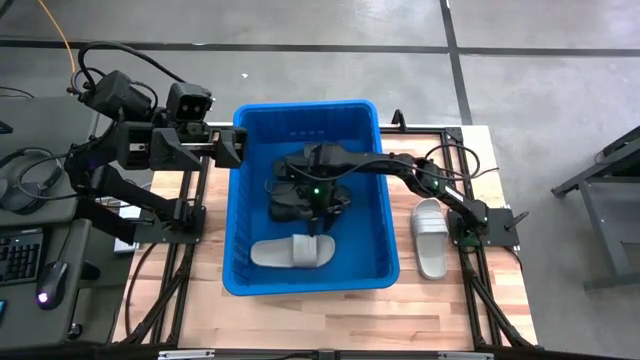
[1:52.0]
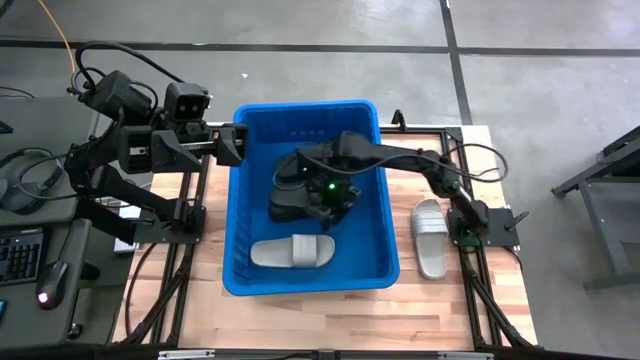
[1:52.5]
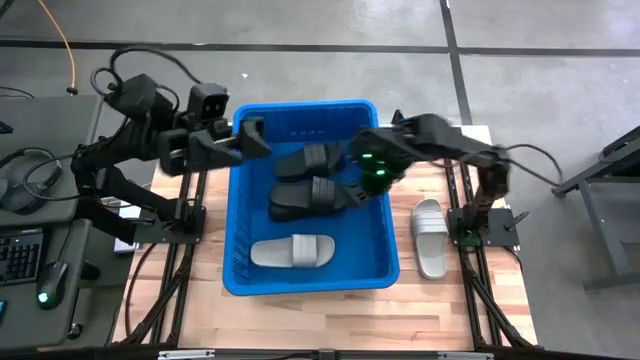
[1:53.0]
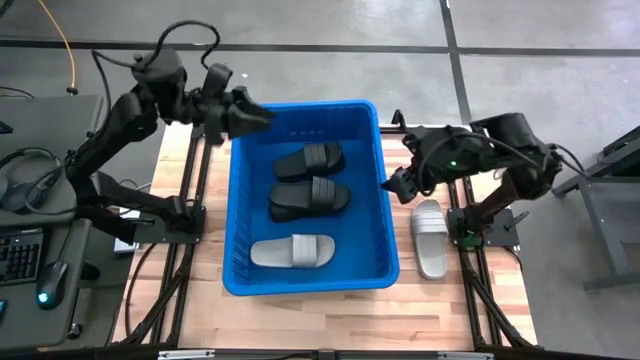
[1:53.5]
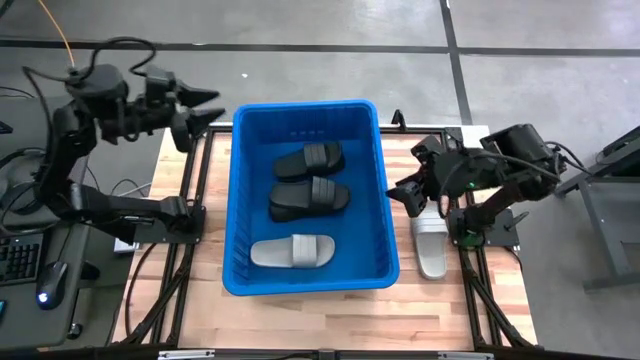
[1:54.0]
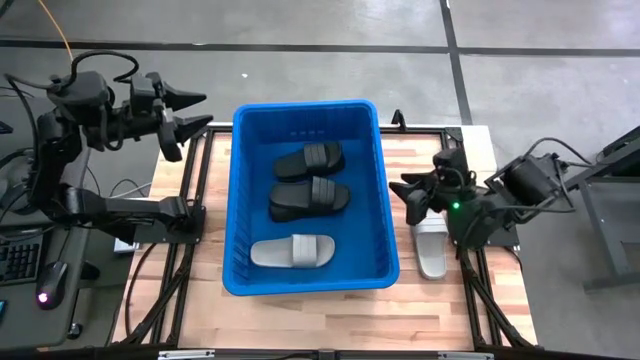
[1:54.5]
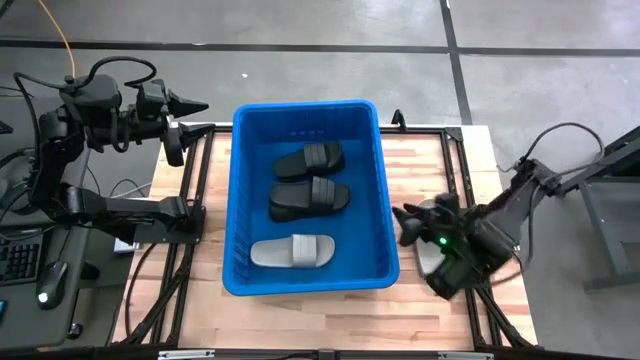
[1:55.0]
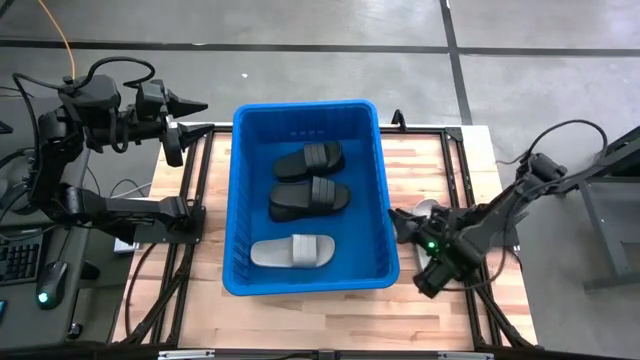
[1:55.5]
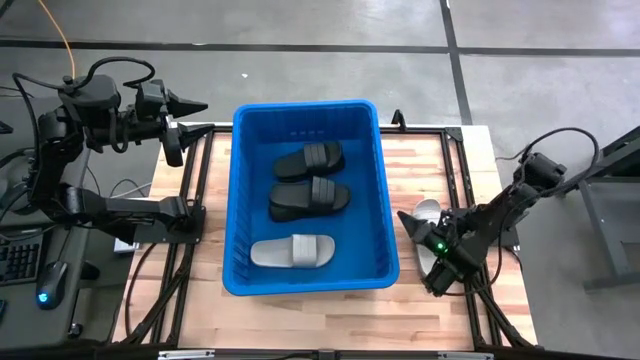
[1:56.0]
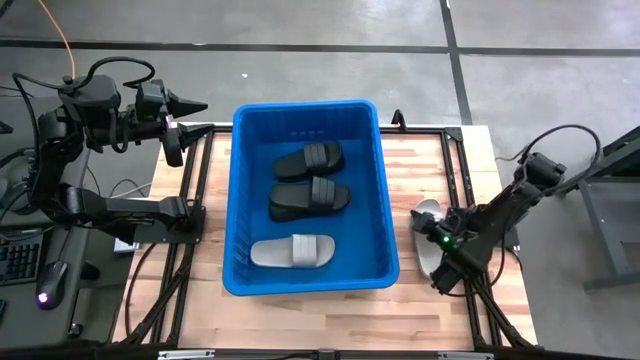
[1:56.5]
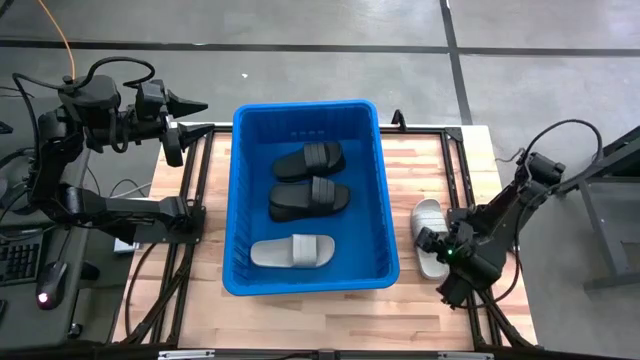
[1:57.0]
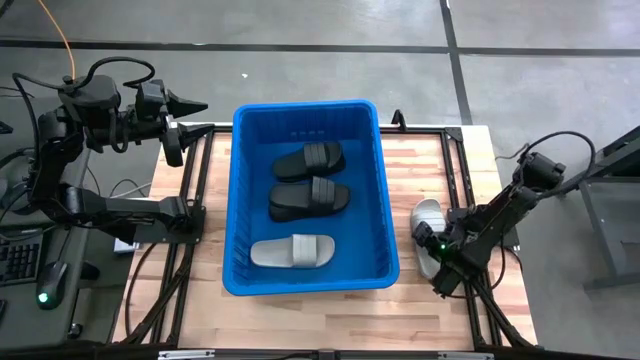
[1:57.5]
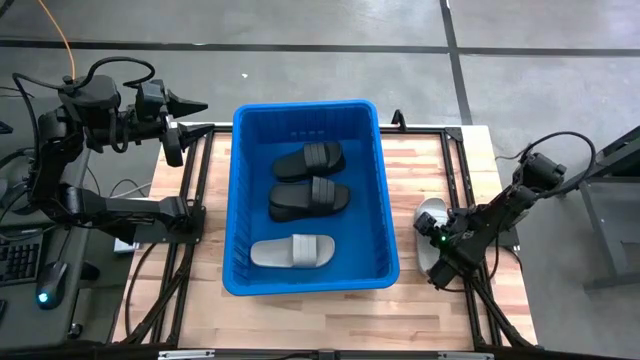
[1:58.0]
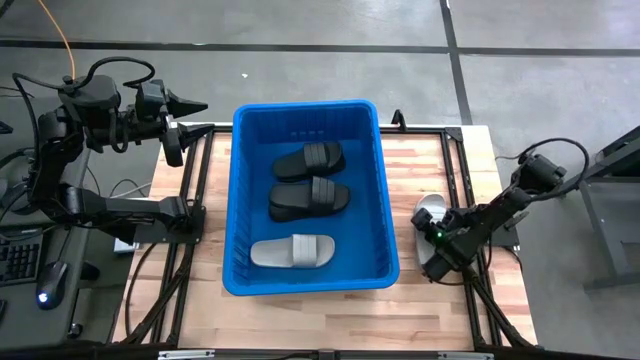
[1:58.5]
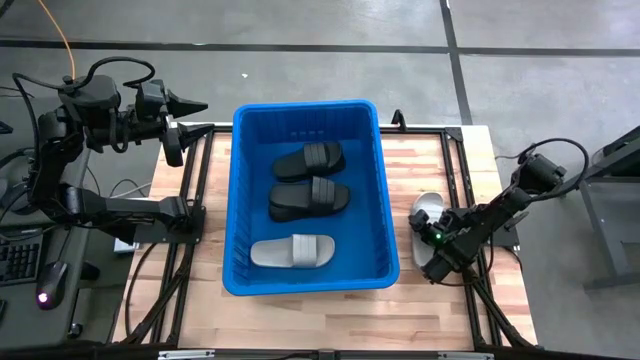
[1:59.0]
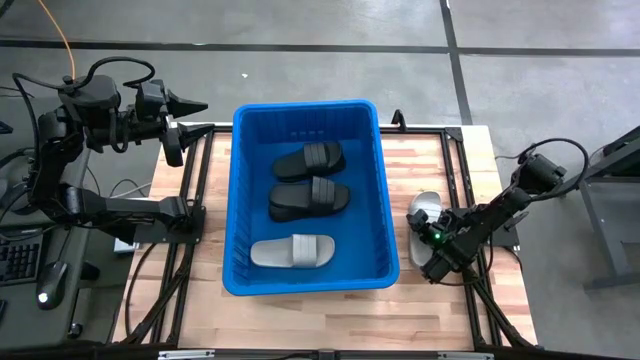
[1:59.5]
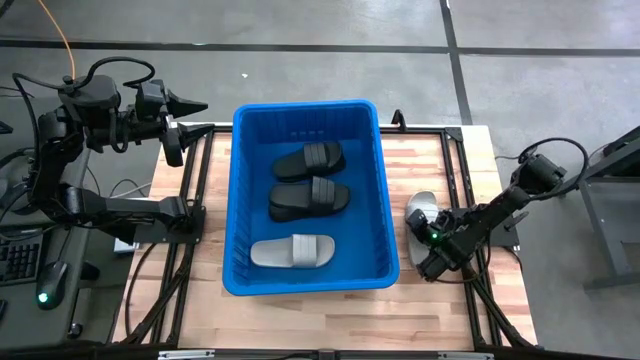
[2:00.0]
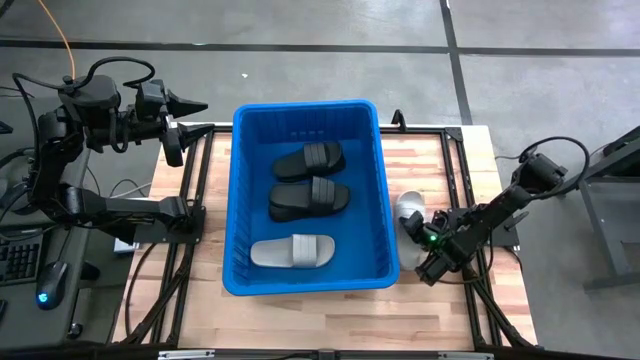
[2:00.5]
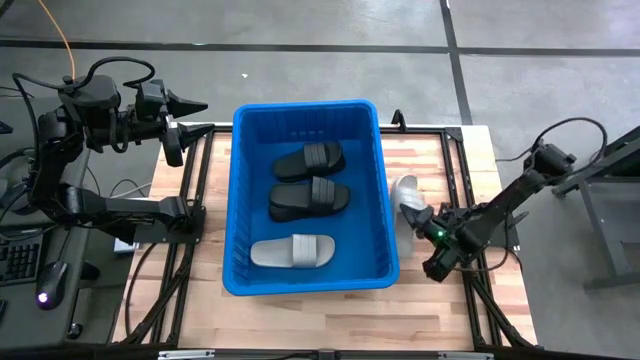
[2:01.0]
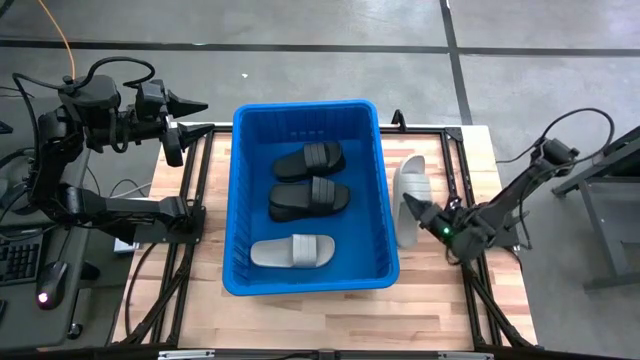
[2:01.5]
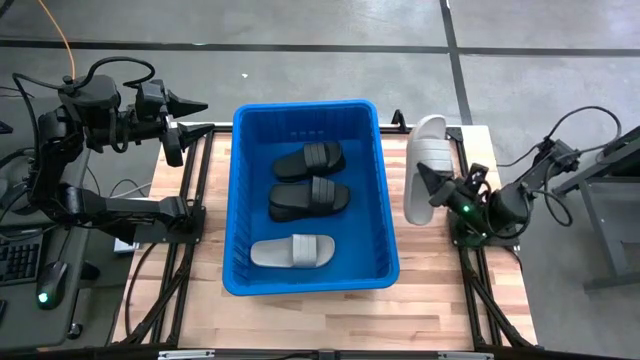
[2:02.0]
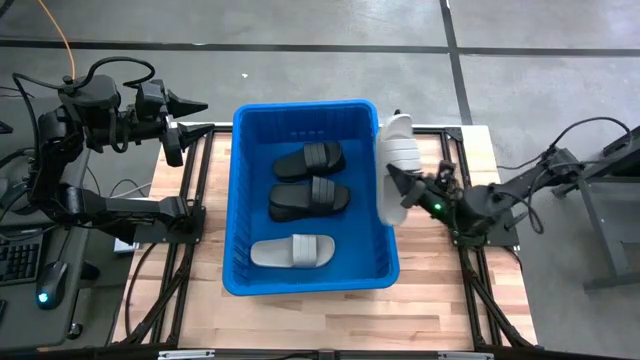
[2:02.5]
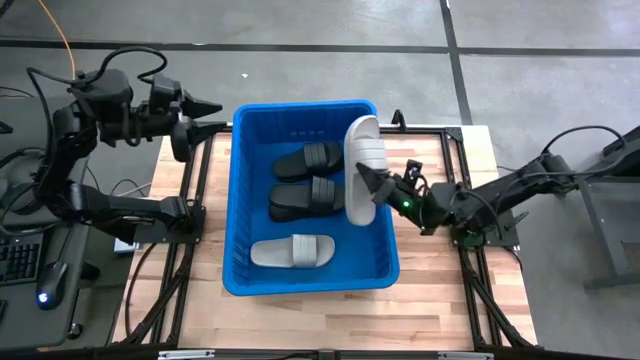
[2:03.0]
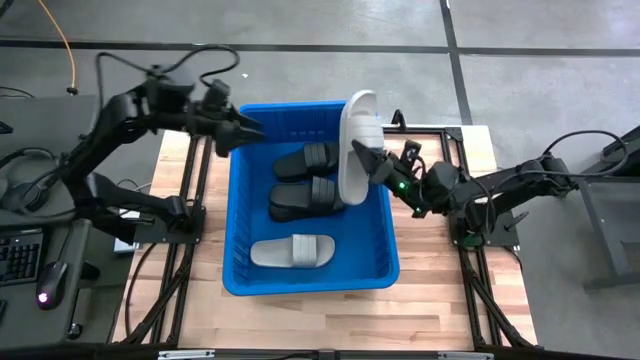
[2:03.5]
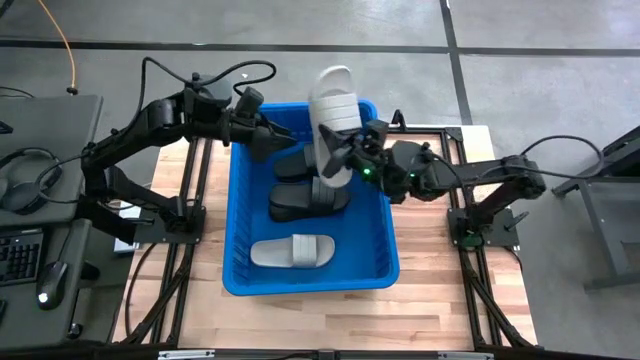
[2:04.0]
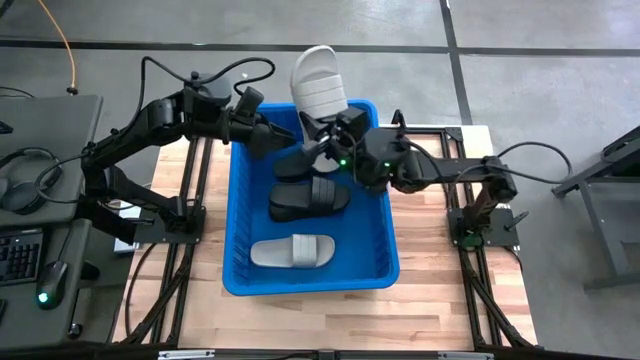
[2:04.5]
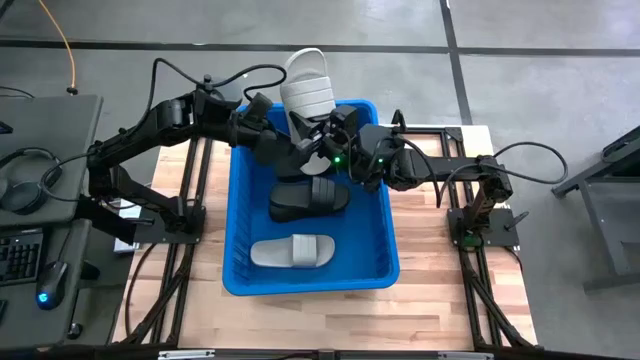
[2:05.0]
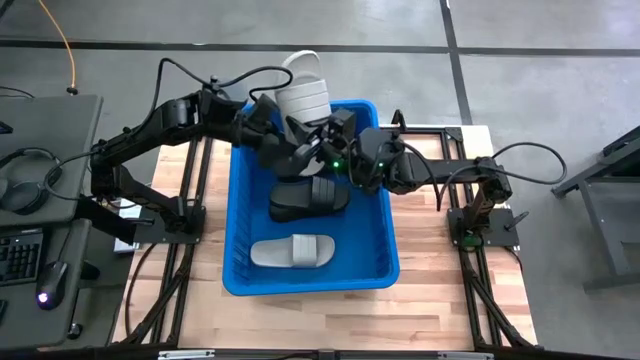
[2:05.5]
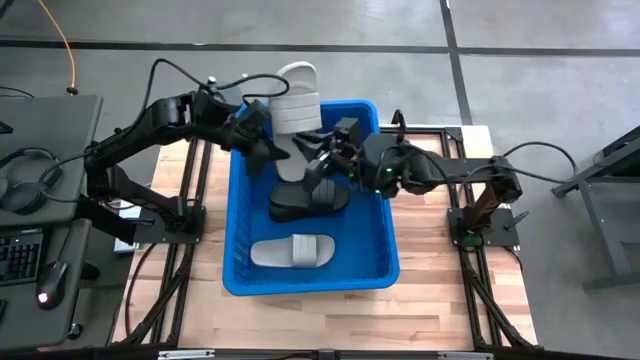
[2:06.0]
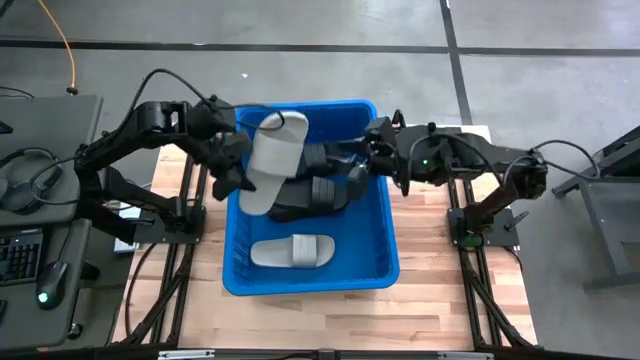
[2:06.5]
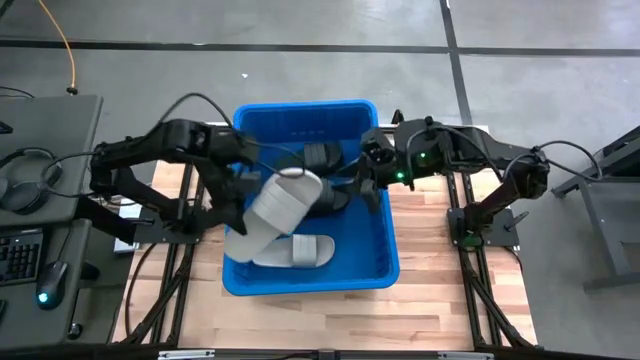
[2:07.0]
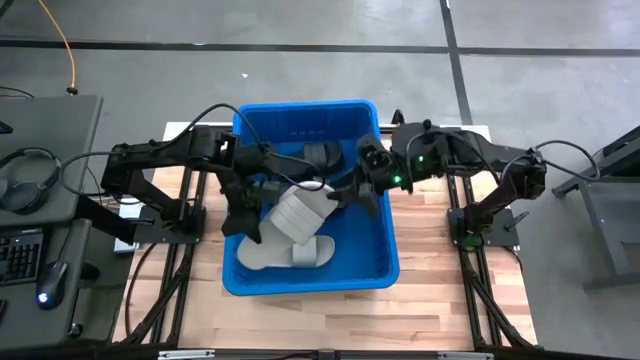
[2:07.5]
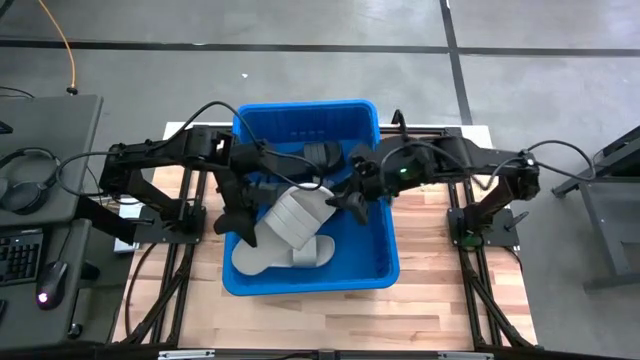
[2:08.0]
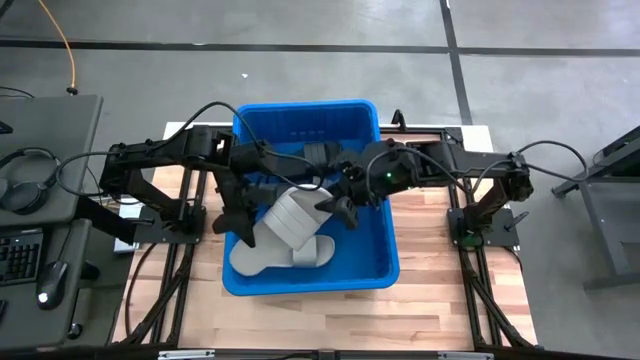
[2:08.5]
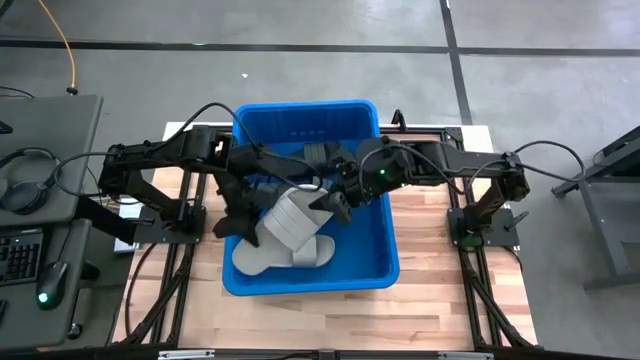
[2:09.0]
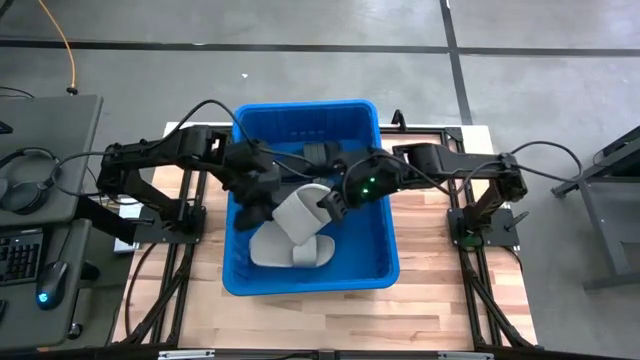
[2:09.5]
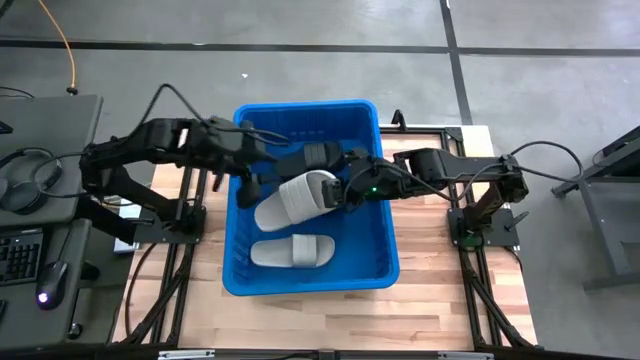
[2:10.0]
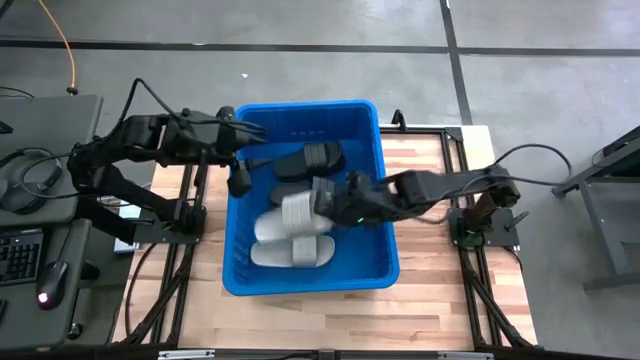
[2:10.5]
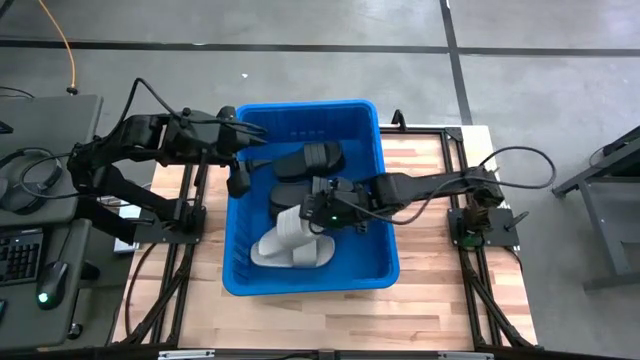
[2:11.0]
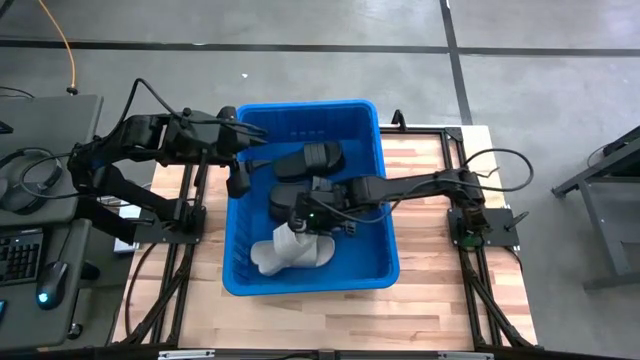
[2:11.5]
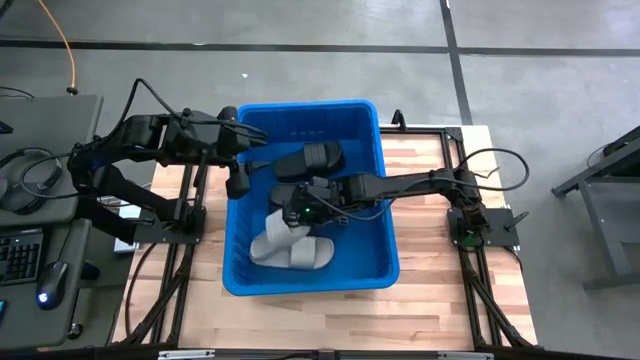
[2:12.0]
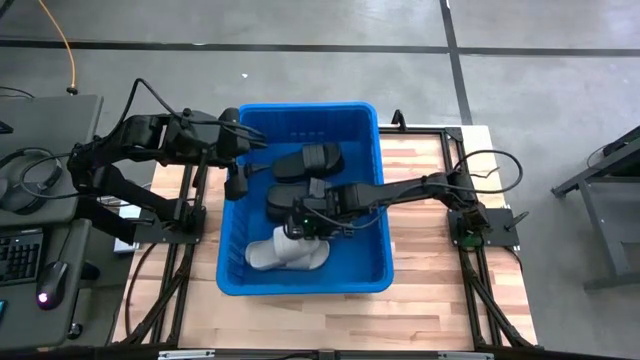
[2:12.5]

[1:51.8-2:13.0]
Task: Pick and place slides into bin
Put the gray slide into the blue container

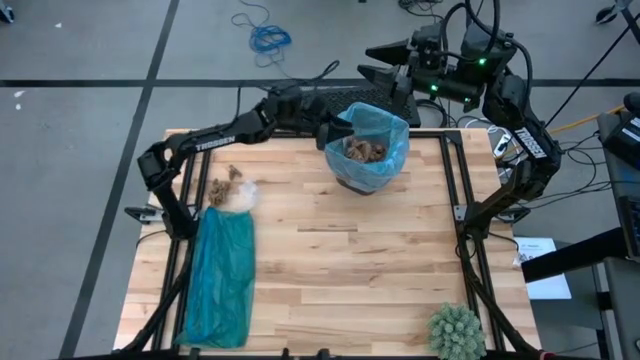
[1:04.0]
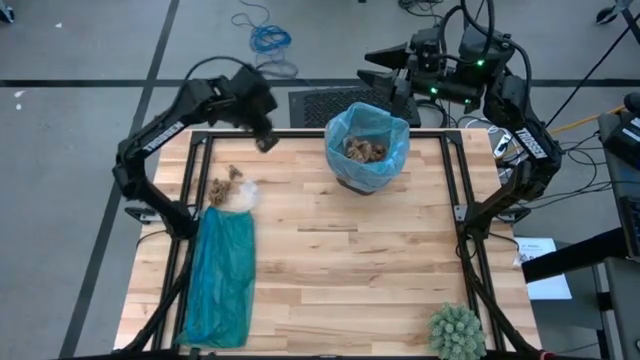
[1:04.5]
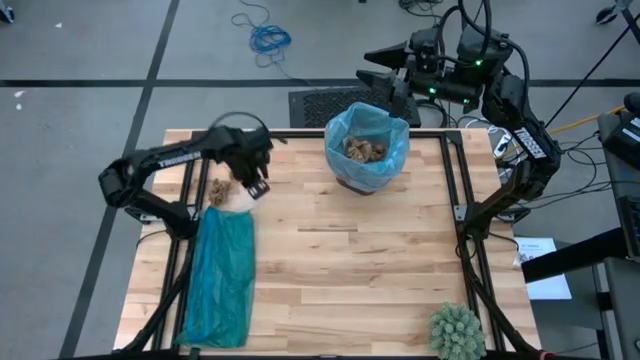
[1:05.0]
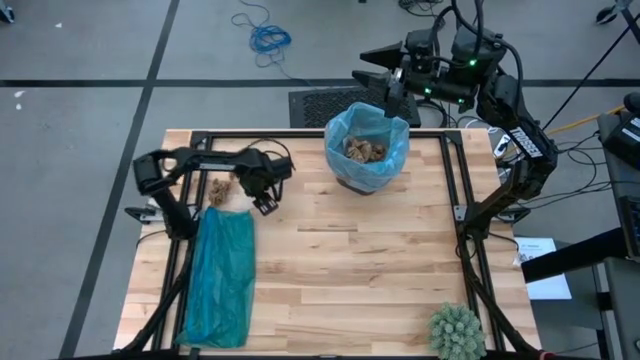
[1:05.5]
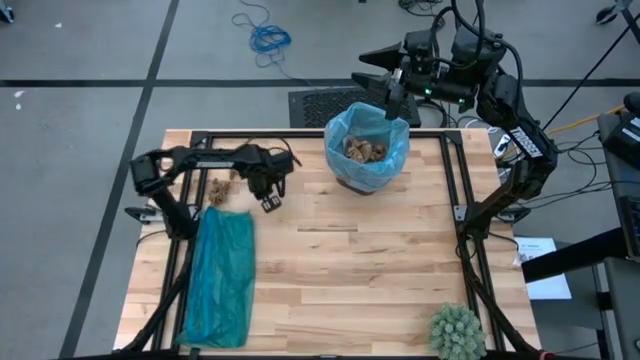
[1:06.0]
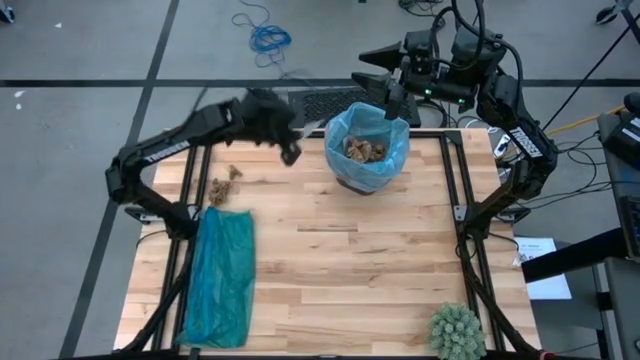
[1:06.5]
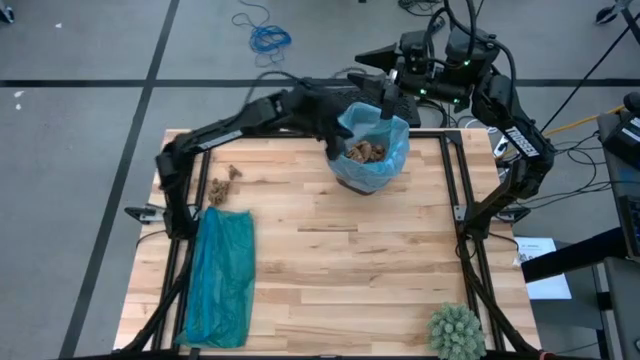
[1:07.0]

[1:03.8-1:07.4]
Task: place trash/remove bag and relplace
Put the transparent plastic into the trash bin
